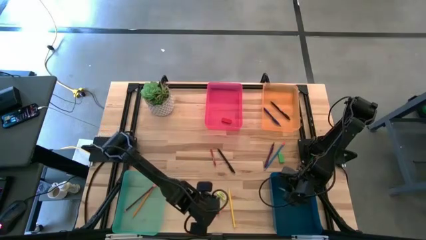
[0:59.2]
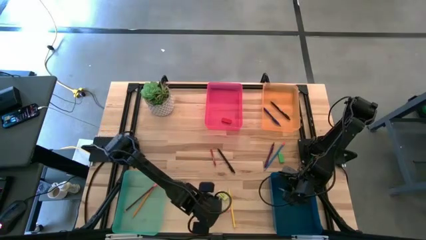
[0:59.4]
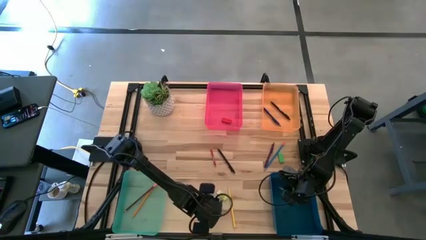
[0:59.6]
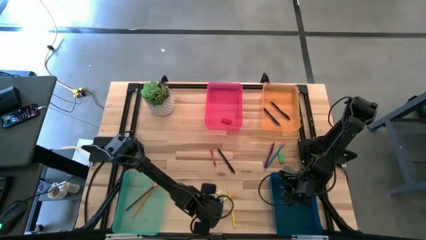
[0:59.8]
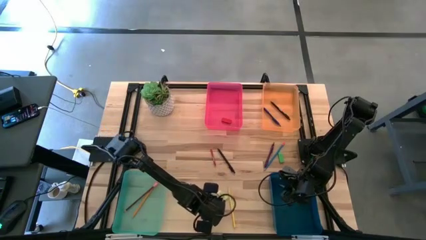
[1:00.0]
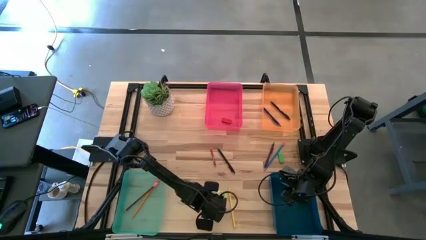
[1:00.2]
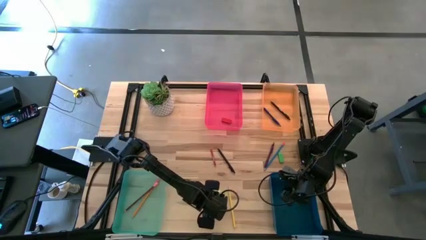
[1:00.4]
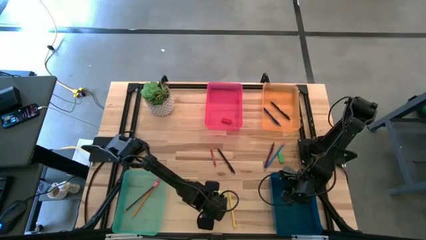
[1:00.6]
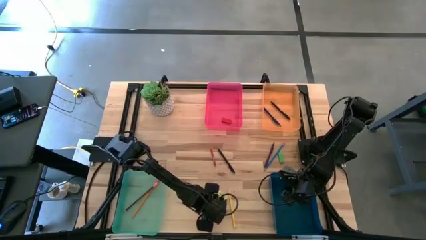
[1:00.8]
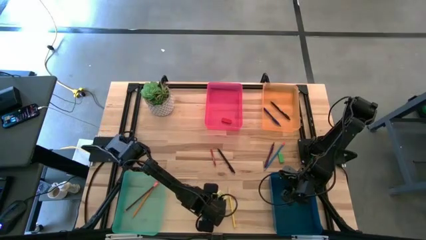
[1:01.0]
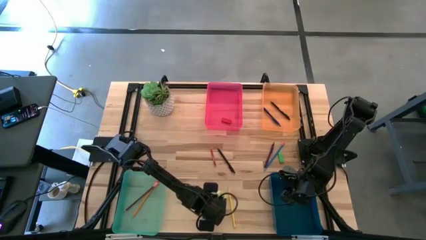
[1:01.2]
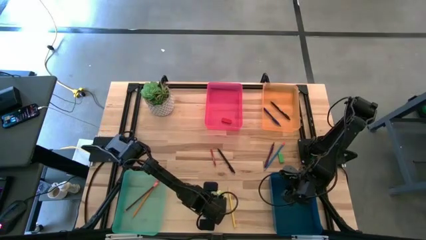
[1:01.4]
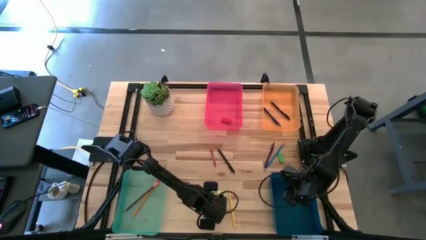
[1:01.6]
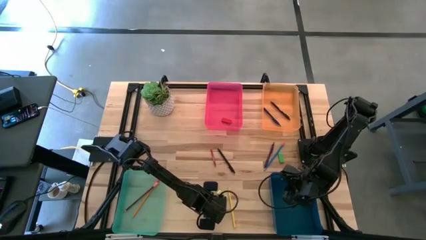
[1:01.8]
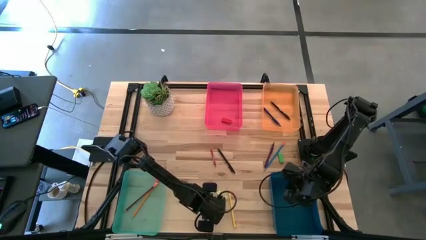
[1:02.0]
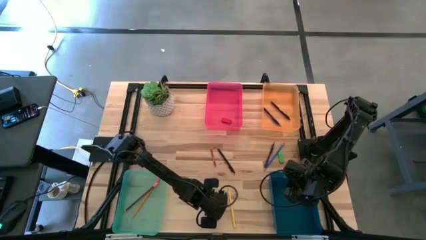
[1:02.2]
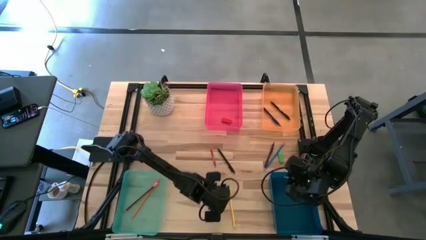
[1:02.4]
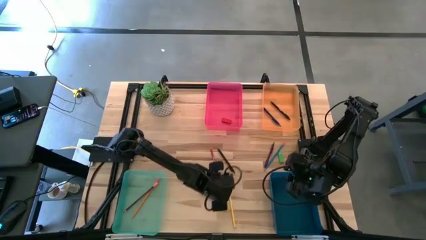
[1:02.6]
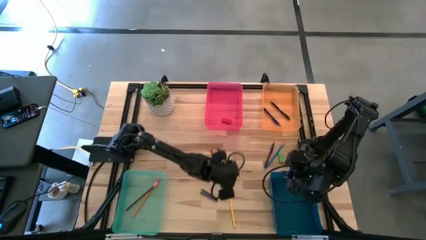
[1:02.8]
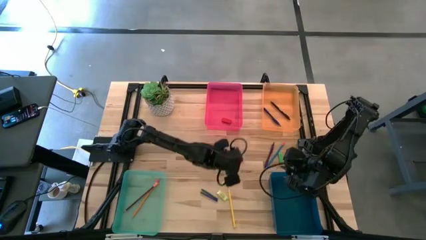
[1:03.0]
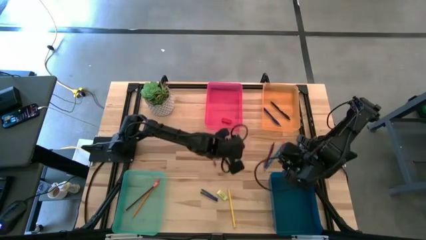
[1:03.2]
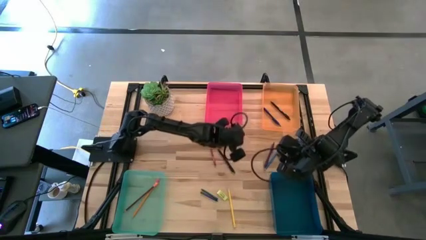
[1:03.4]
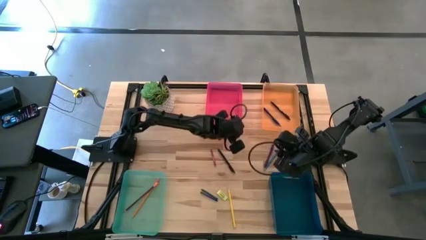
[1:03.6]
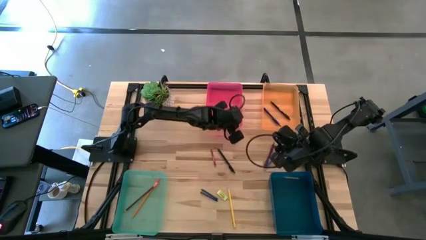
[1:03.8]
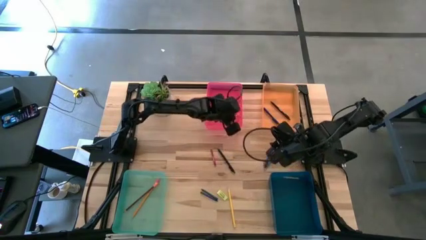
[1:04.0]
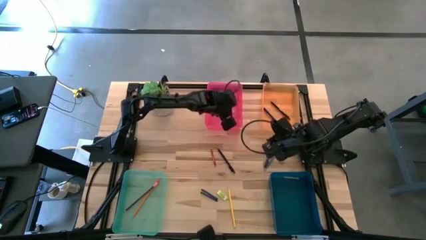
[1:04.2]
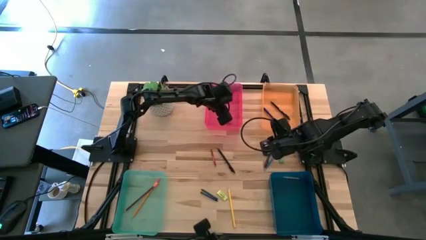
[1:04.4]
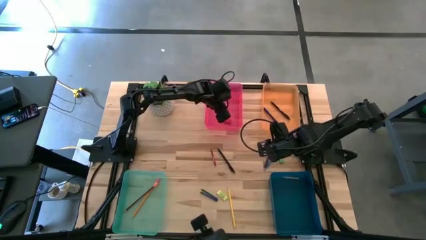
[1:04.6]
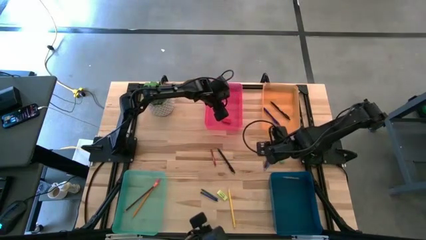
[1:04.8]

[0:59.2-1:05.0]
Task: Sort crayons/erasers/pens/pencils in bins
Put the pink eraser into the pink bin

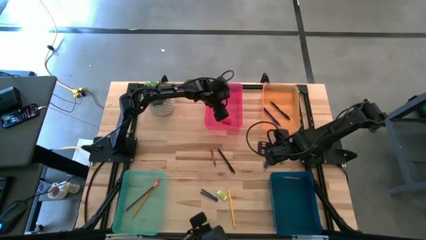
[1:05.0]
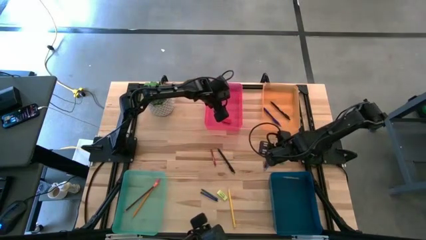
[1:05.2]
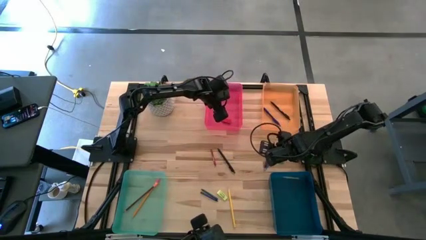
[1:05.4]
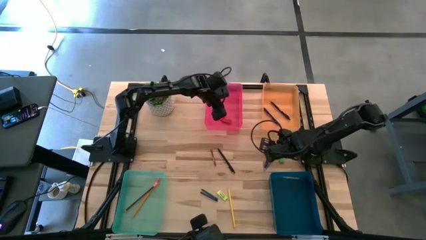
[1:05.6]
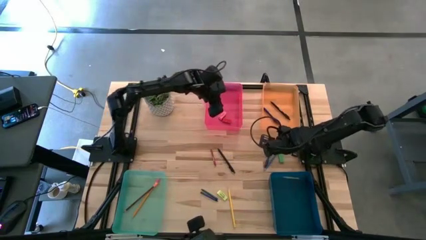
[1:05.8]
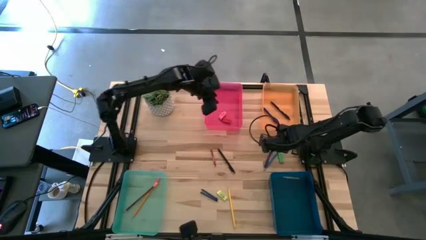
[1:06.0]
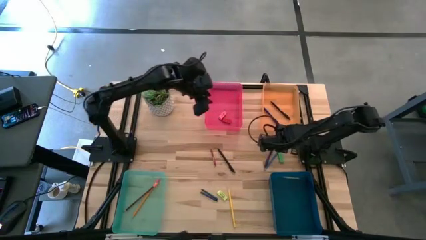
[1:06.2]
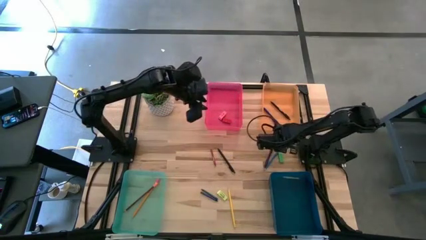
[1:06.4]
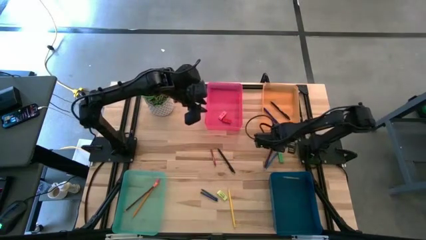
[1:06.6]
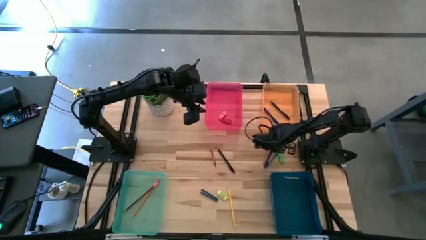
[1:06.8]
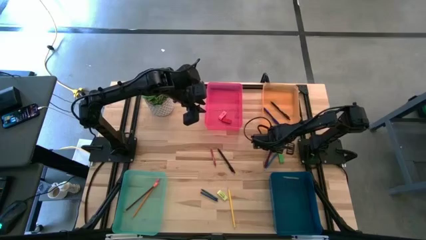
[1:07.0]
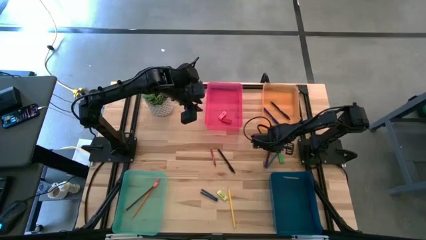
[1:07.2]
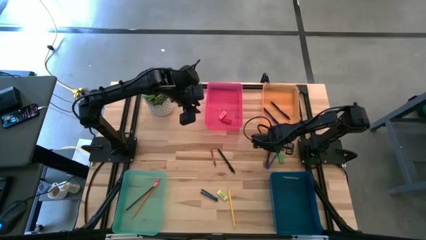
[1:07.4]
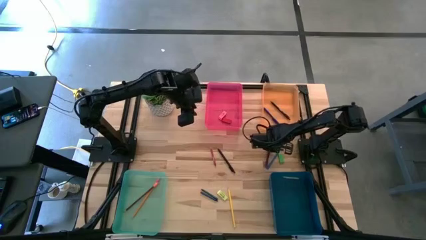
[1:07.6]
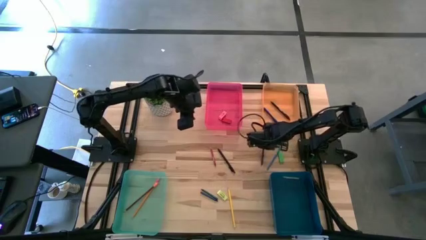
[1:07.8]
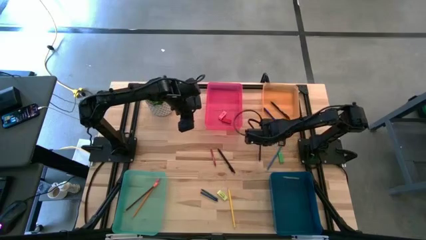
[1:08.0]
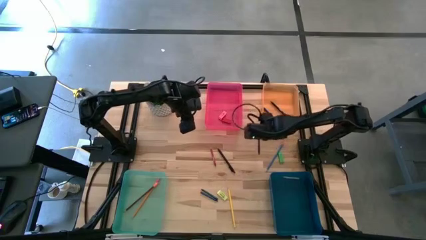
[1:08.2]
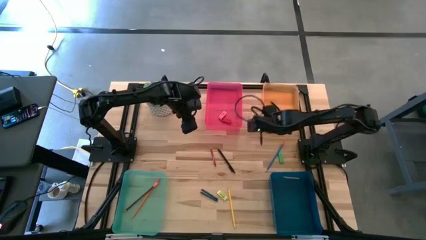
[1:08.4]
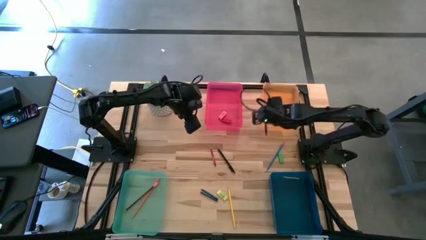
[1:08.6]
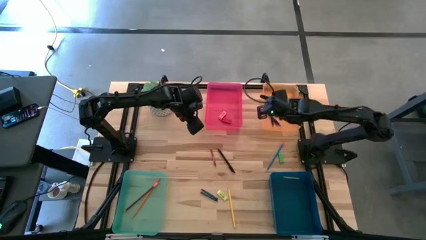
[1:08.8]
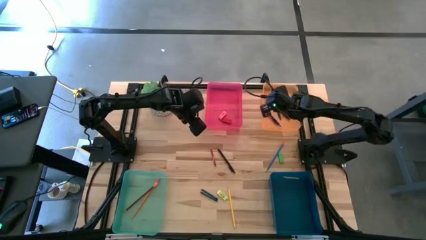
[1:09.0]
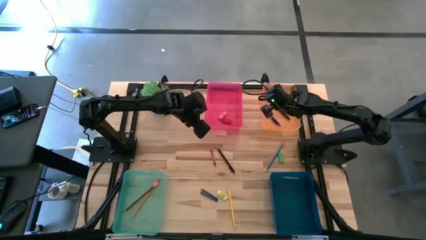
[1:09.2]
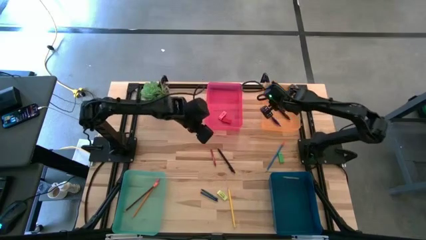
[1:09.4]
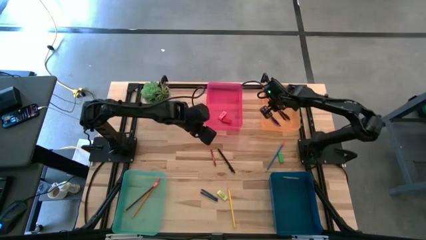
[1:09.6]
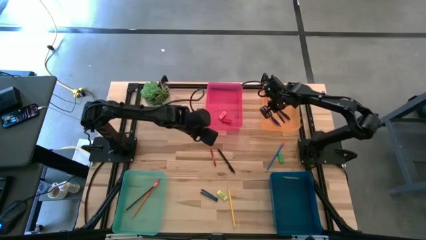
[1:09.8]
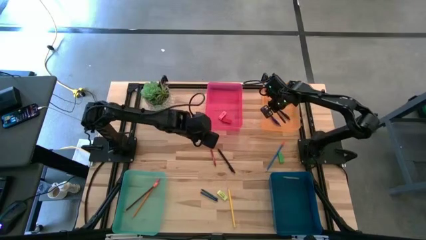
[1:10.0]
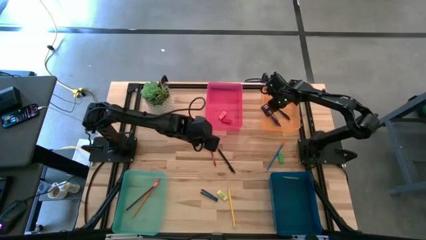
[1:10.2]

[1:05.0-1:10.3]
Put the violet pen into the orange bin

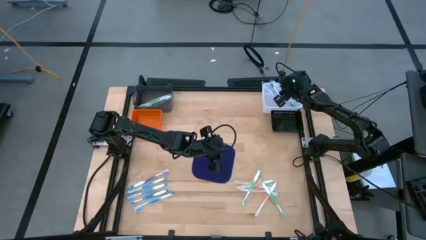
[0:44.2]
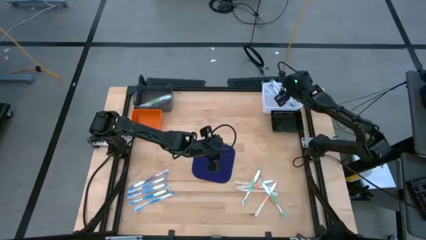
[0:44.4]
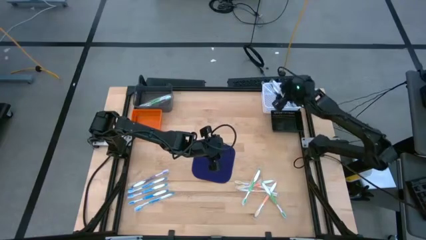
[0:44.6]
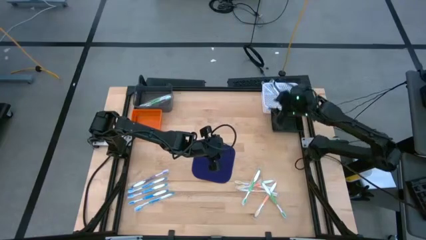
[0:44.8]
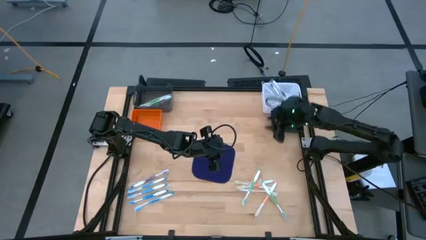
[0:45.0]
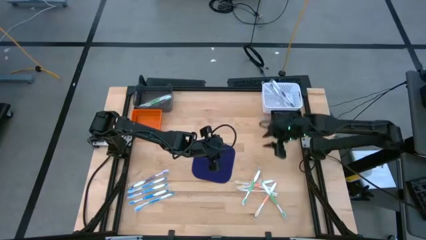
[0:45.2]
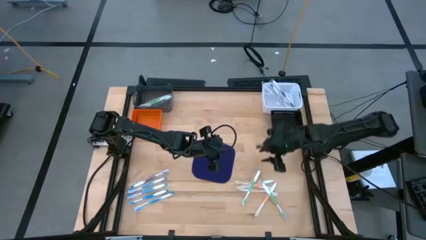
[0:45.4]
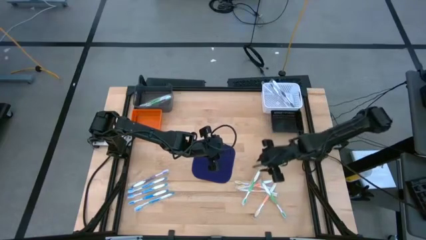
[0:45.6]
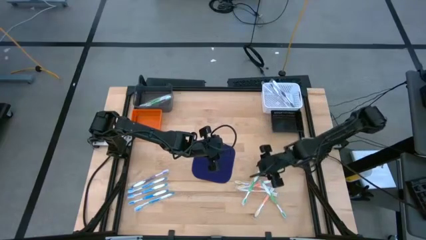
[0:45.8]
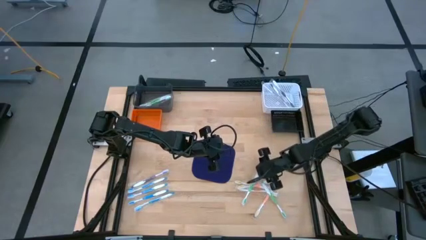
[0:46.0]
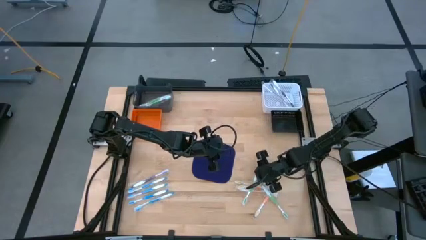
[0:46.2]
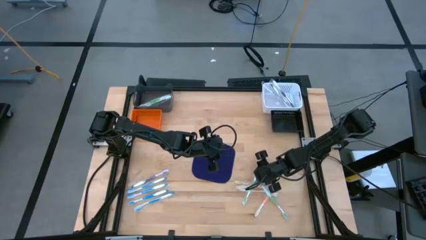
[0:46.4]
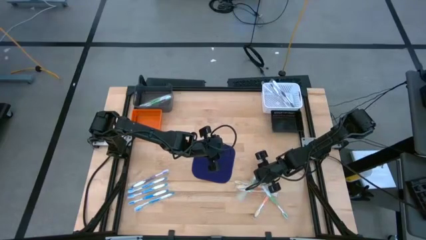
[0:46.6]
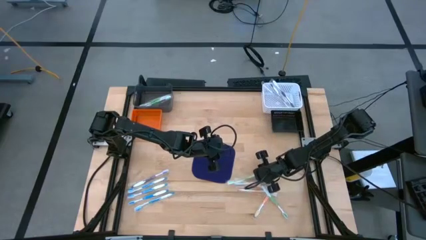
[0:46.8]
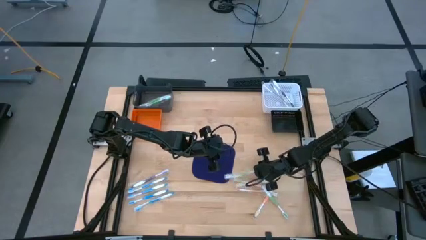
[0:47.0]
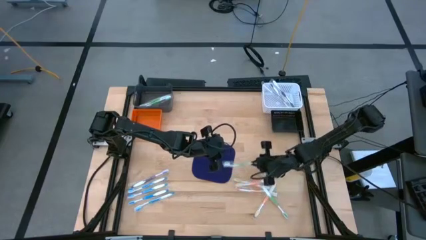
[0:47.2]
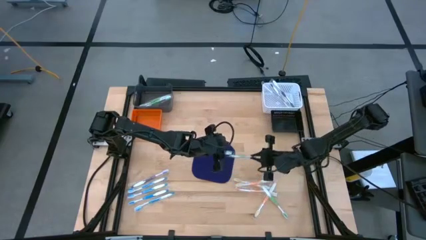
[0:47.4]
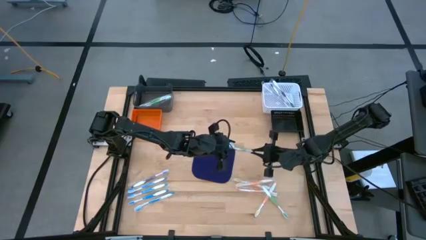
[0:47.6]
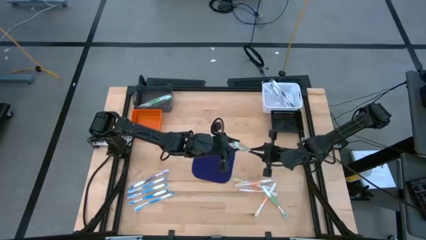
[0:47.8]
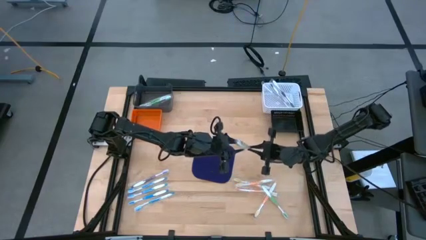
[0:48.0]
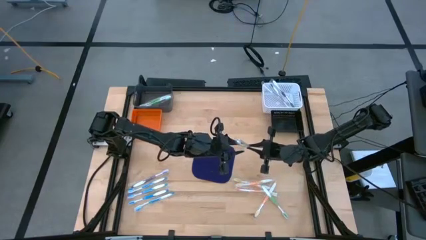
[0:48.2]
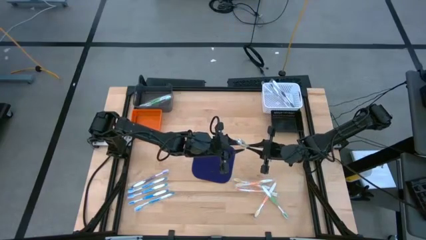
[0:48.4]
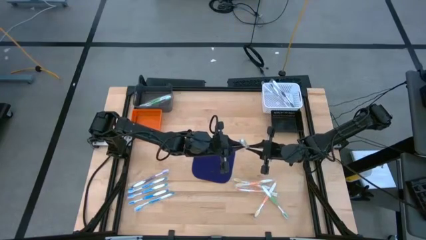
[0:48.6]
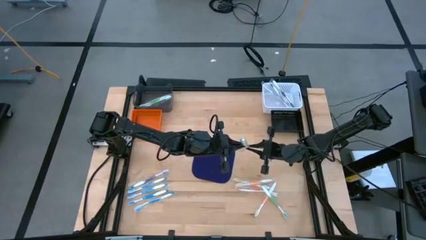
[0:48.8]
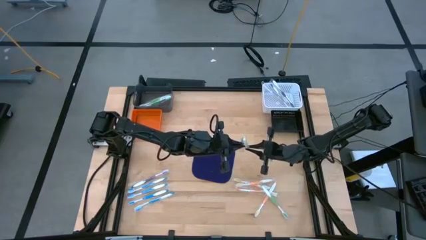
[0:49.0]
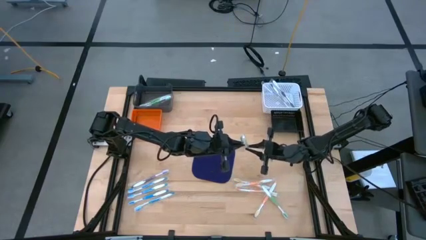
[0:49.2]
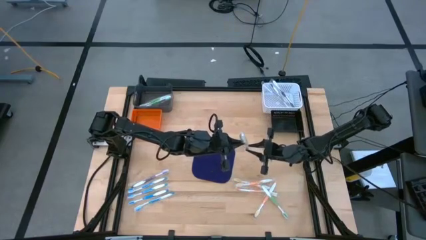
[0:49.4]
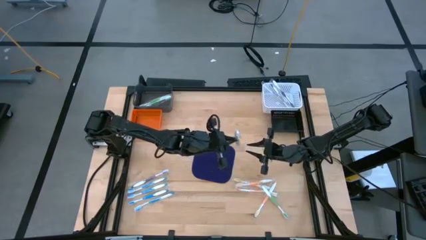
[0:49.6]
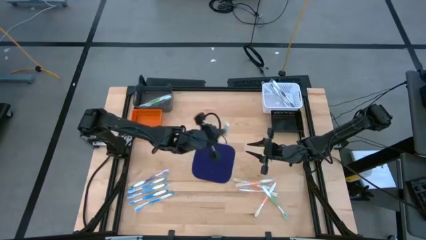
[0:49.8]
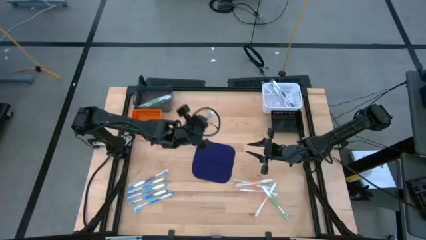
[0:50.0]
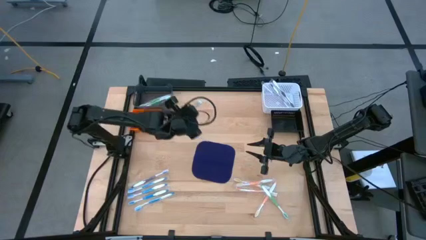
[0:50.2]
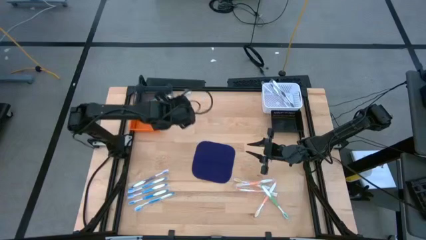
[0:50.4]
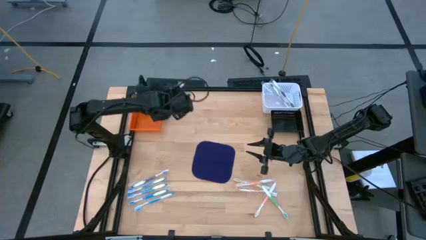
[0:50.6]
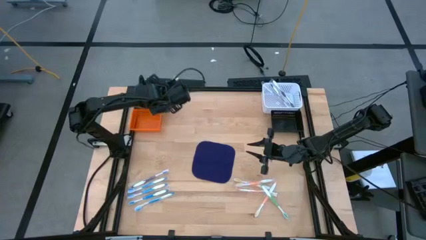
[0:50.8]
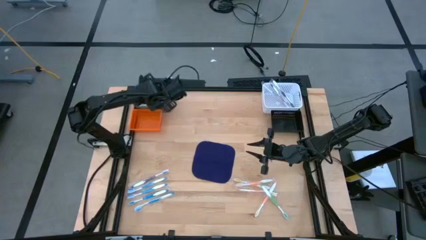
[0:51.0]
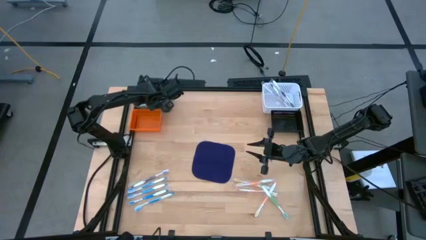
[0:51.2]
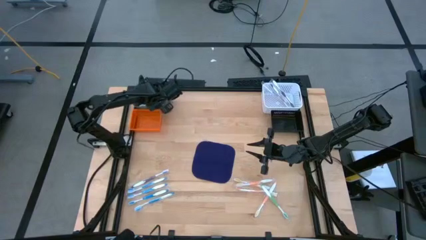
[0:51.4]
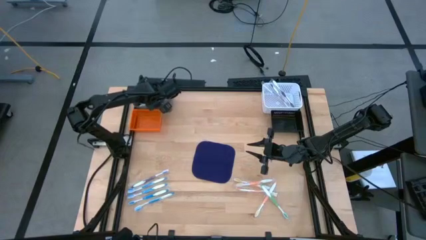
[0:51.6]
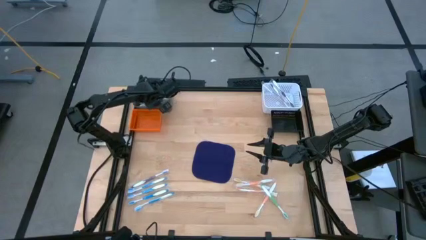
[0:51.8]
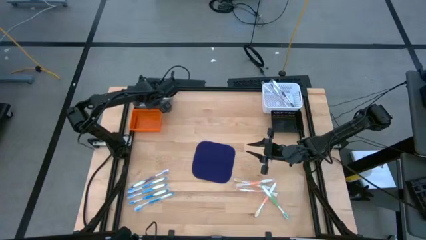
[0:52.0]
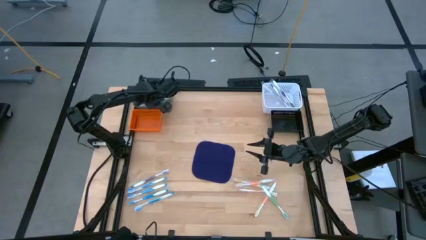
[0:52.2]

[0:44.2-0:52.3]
Task: Pick & Place Toothbrushes
Put the green toothbrush into the gray bin
